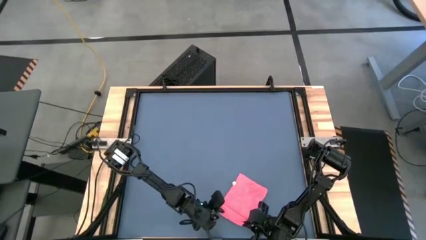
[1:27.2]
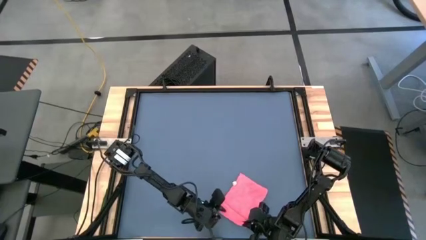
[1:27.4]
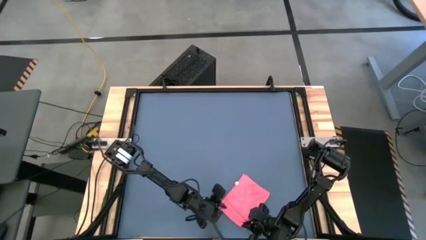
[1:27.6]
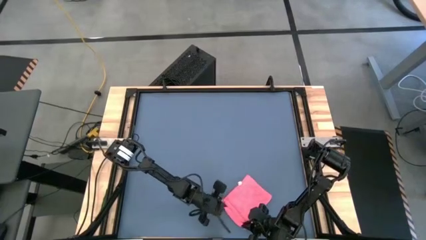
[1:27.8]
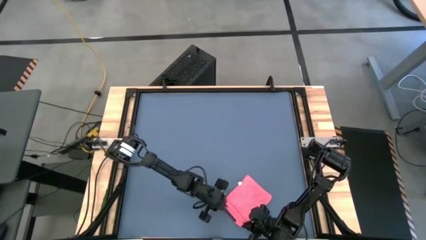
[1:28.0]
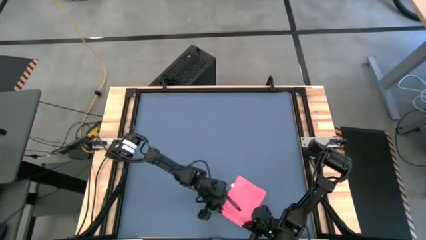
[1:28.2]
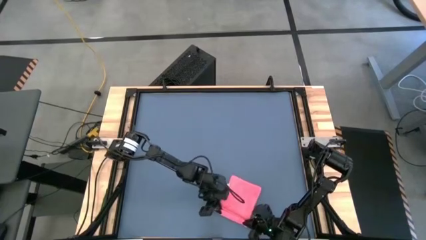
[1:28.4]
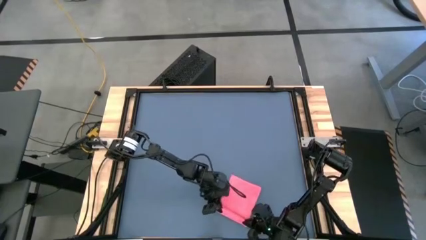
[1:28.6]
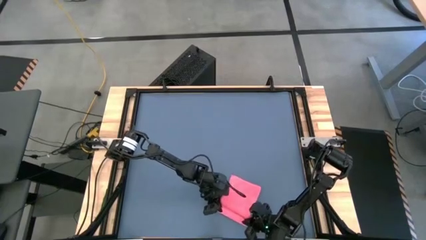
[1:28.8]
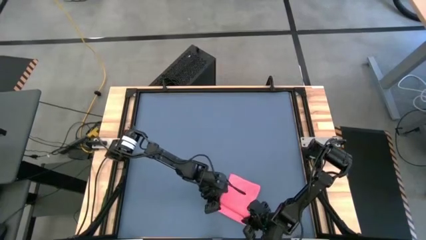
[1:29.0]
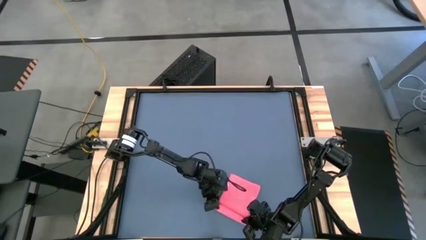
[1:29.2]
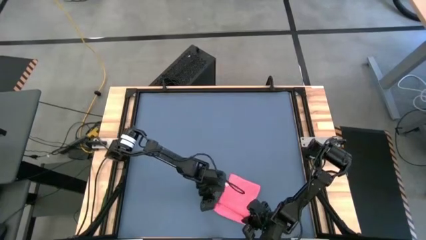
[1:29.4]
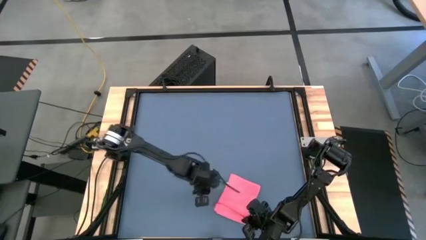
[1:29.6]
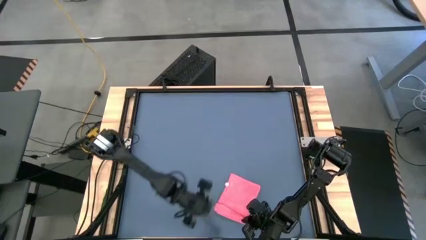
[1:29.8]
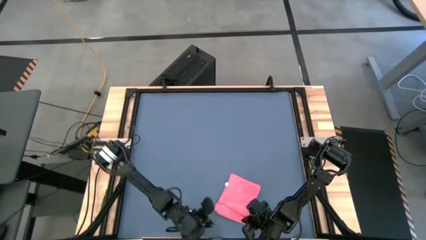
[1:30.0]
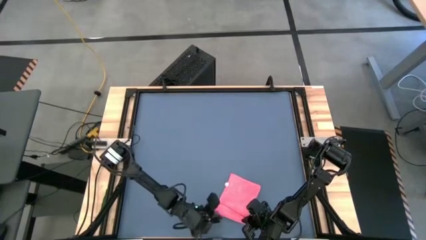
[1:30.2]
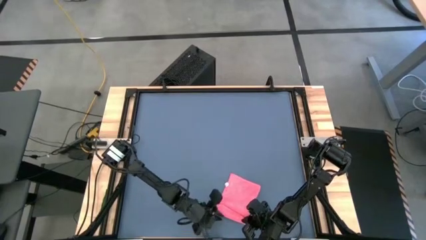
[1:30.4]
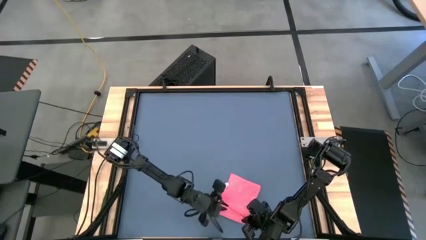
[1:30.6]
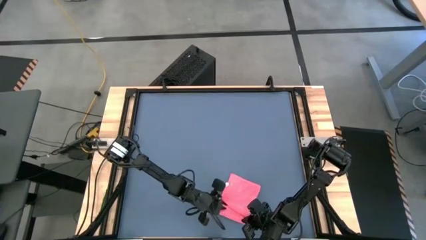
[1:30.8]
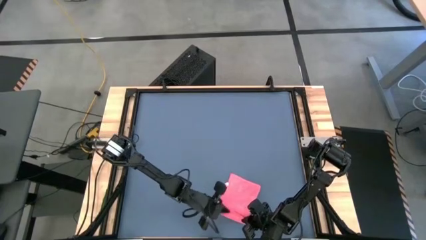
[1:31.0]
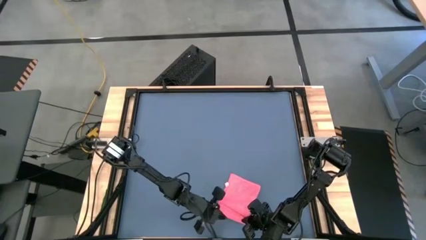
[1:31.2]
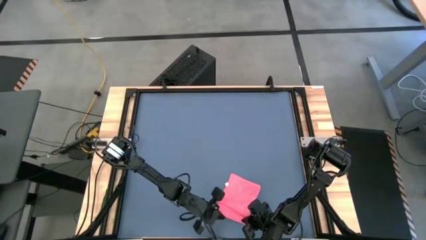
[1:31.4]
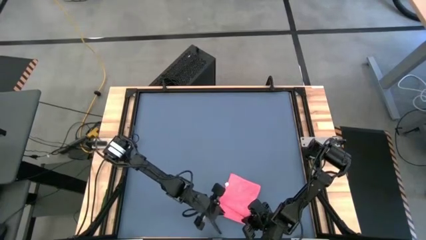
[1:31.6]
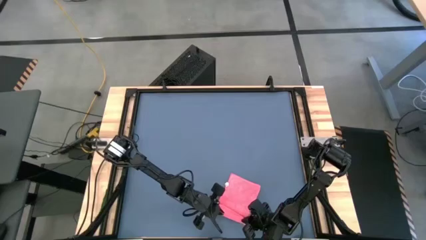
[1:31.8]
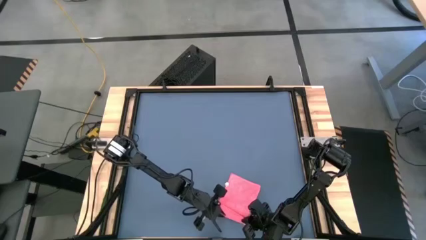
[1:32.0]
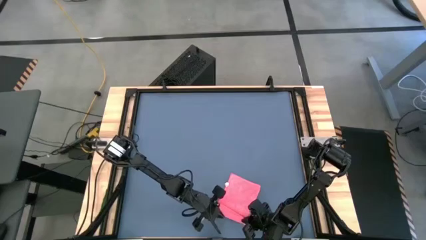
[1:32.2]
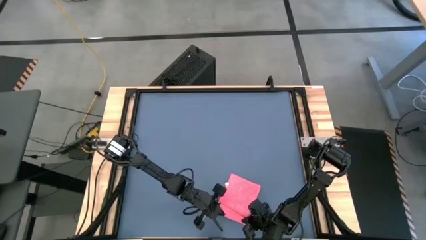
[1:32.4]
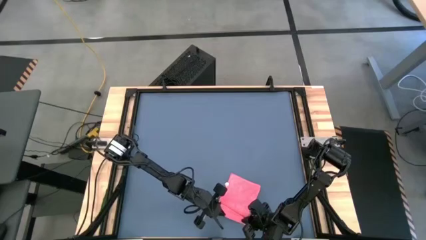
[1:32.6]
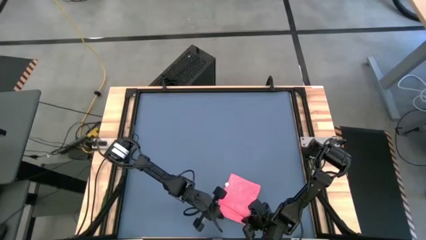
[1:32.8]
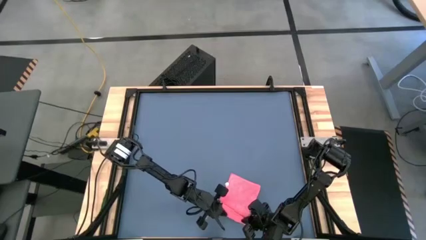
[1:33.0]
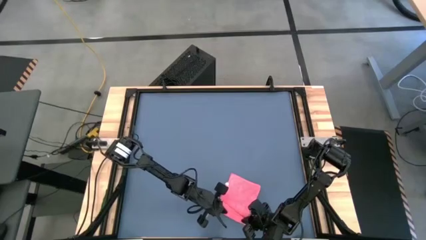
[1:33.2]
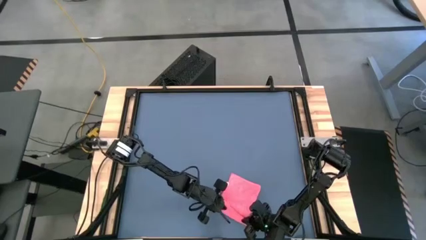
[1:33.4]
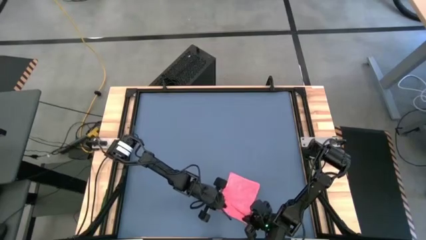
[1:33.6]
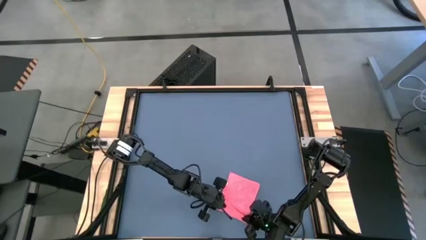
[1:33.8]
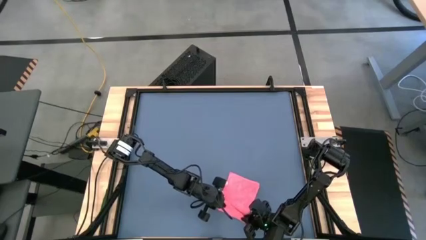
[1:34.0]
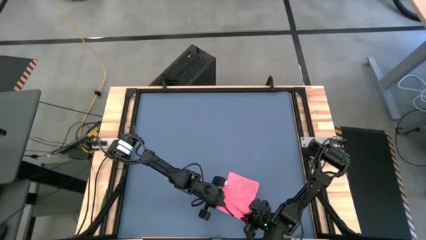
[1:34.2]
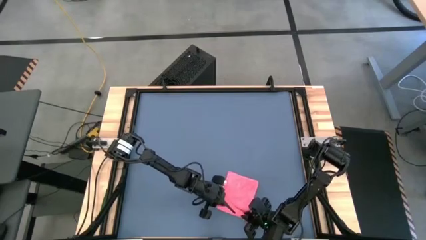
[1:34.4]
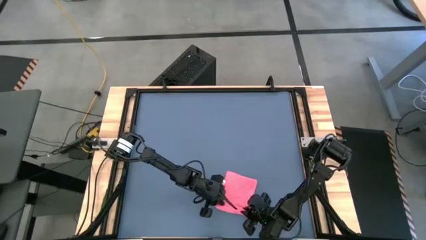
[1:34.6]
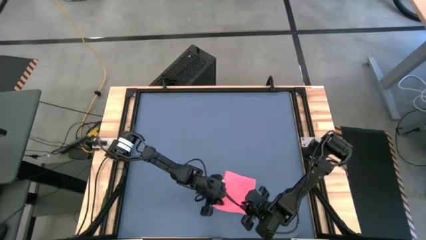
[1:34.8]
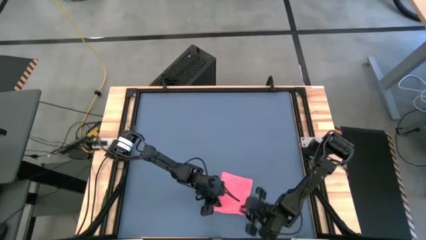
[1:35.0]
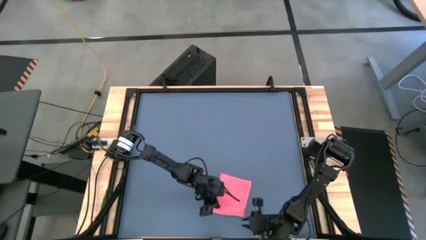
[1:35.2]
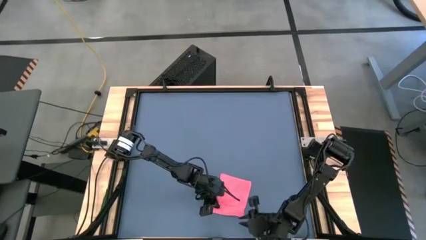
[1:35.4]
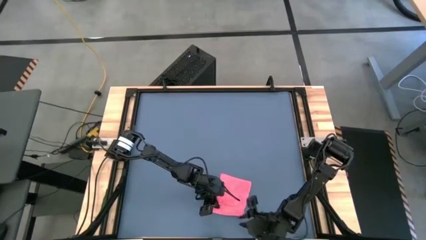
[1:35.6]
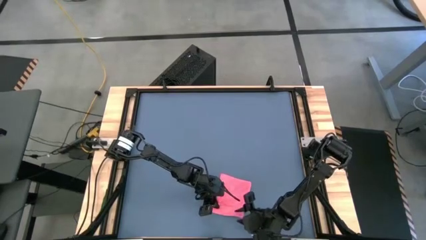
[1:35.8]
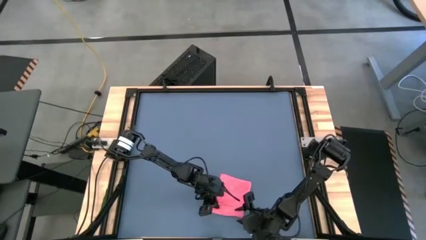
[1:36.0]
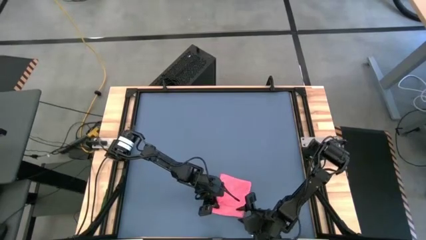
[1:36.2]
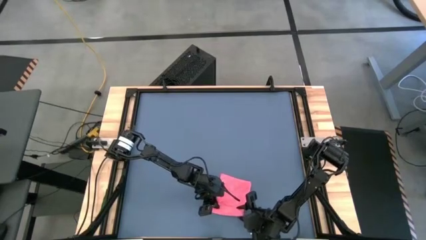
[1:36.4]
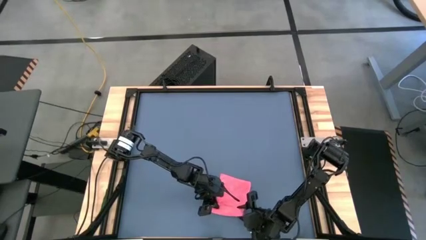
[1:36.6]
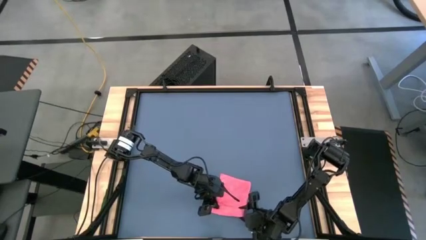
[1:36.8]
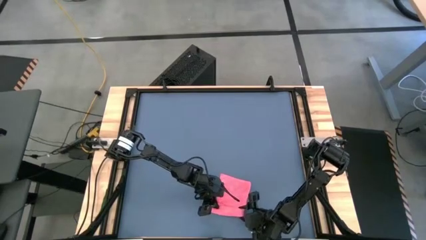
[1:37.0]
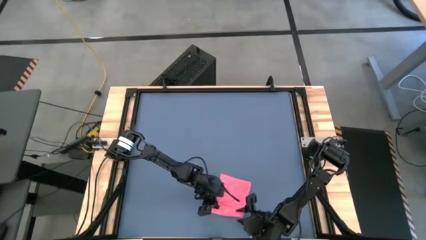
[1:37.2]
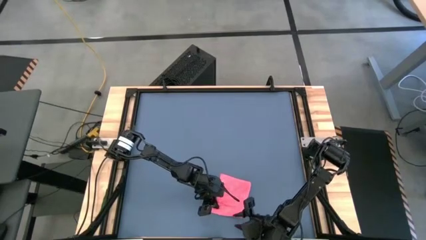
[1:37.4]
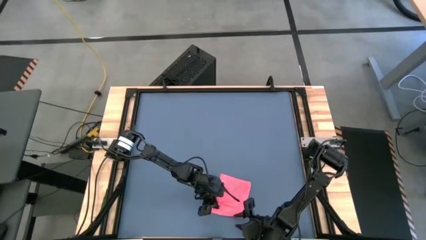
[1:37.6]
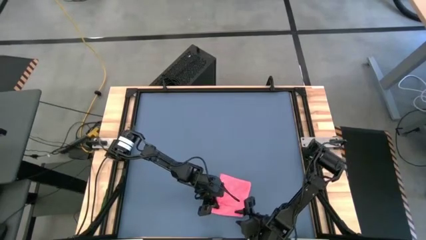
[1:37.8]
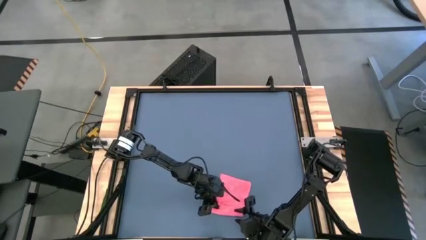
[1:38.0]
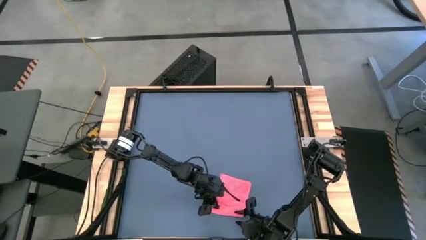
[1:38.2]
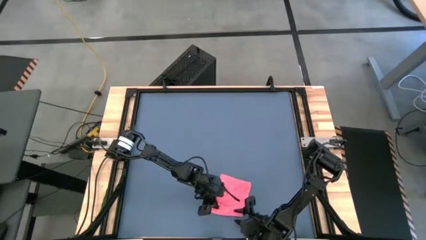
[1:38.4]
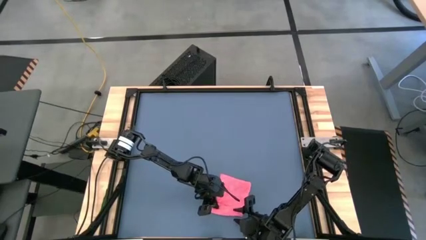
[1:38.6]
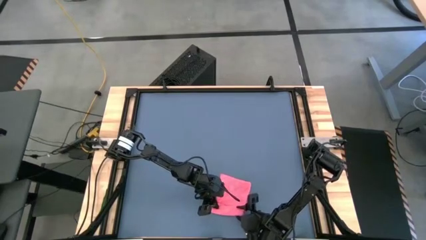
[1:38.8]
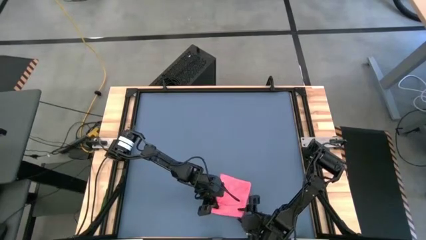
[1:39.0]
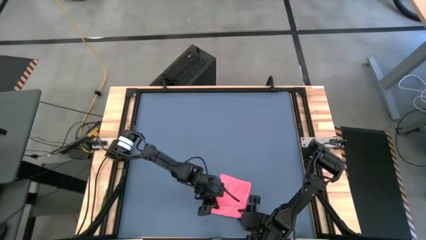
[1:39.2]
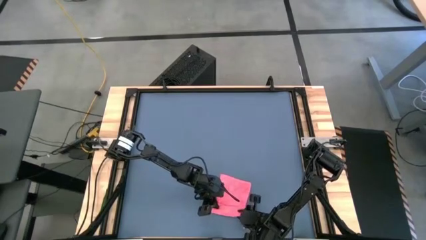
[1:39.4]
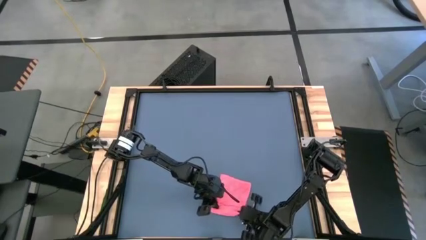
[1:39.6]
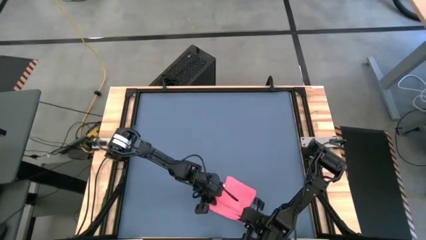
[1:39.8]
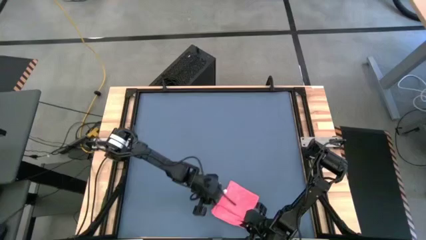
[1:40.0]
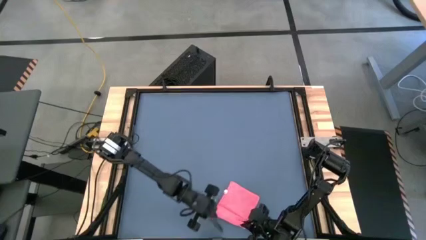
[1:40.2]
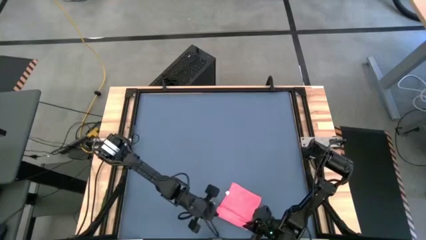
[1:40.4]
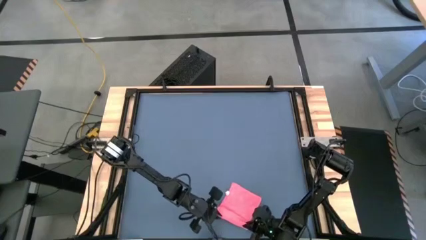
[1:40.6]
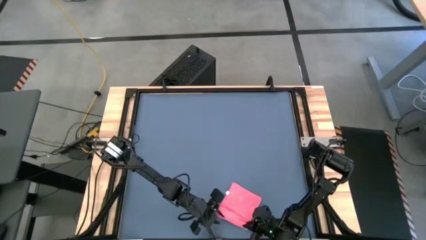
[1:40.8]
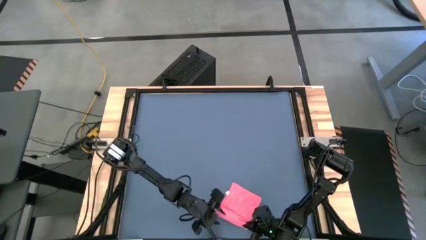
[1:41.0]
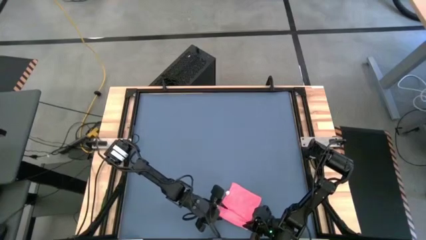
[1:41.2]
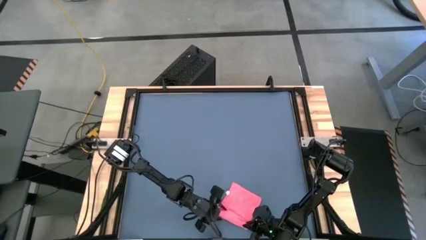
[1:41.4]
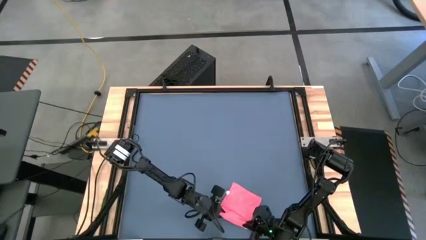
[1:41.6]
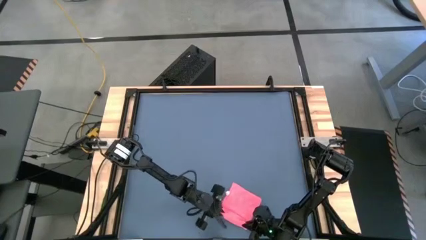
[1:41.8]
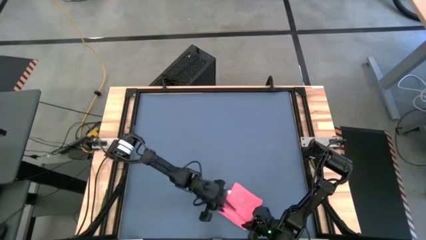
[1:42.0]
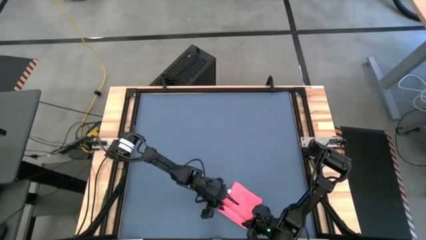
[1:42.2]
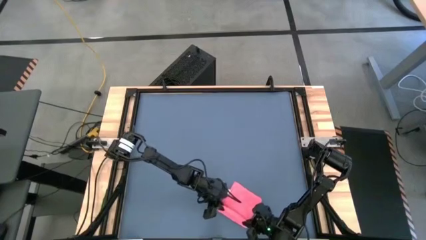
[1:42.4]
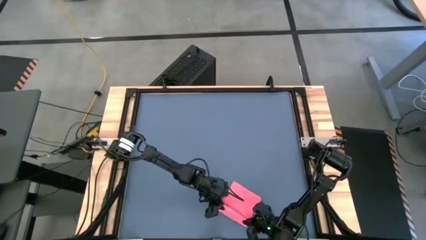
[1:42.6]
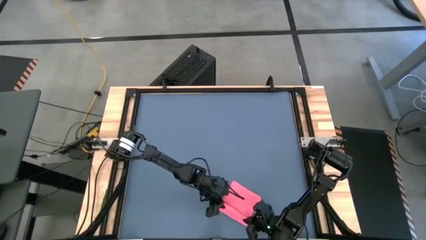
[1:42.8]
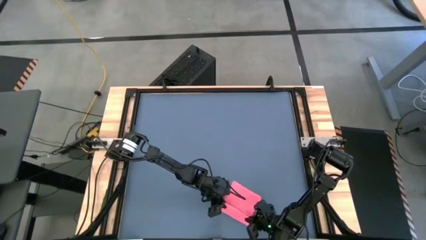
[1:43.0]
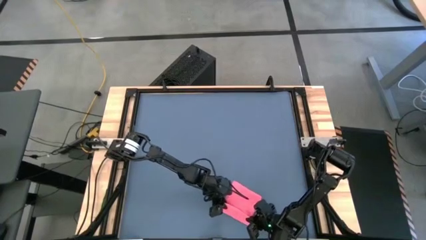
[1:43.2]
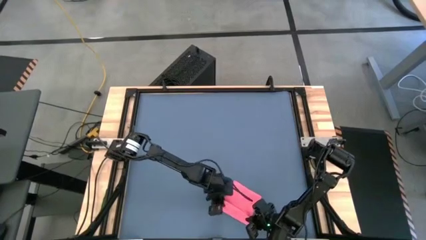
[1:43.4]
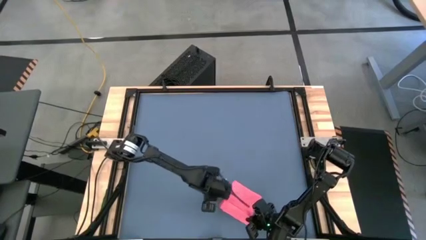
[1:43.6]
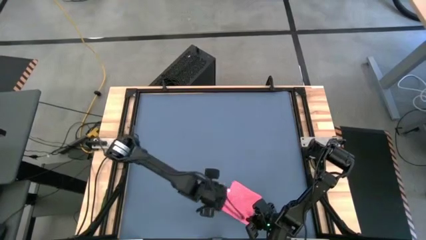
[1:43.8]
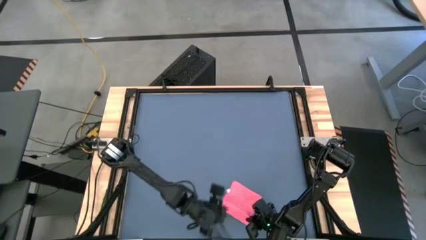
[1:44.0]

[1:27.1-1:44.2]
Task: Roll towel
Roll the microfiber towel
